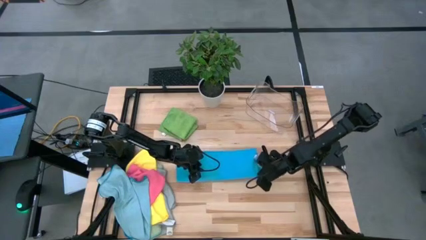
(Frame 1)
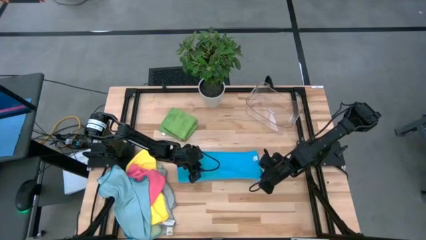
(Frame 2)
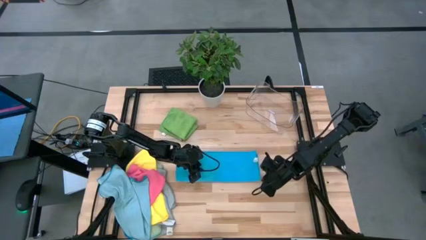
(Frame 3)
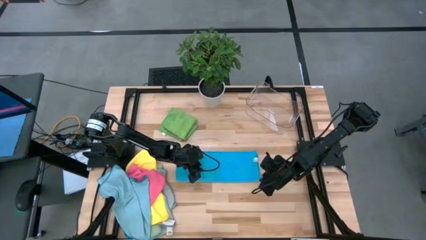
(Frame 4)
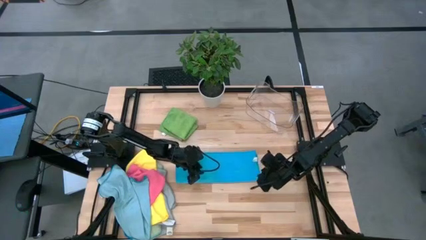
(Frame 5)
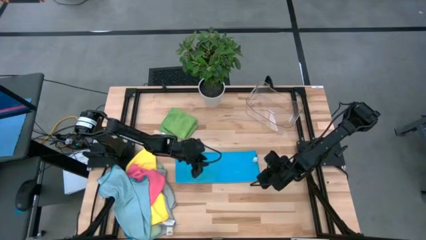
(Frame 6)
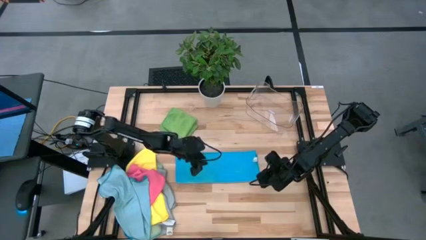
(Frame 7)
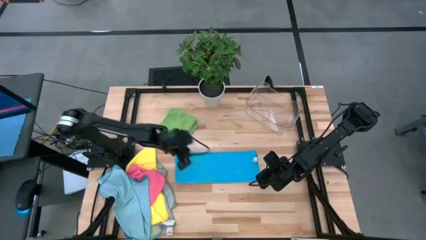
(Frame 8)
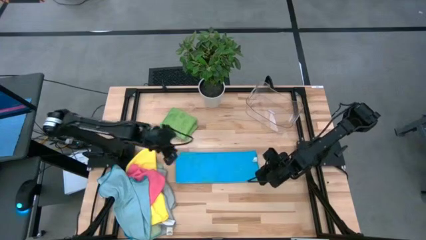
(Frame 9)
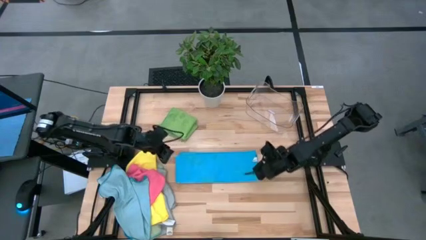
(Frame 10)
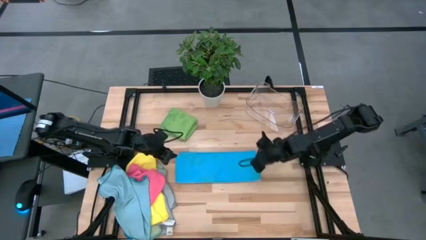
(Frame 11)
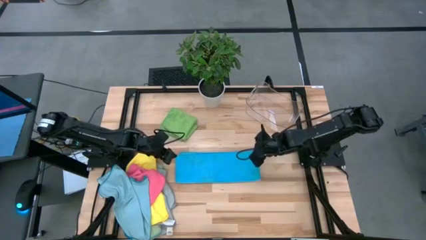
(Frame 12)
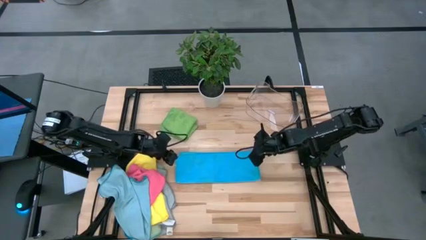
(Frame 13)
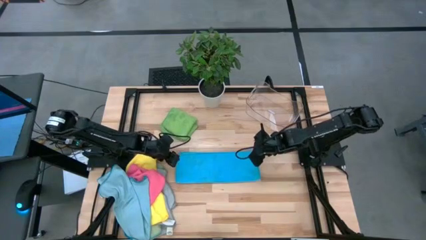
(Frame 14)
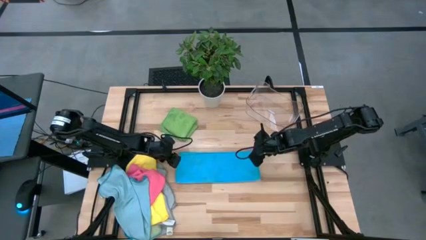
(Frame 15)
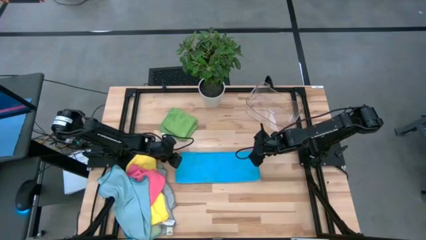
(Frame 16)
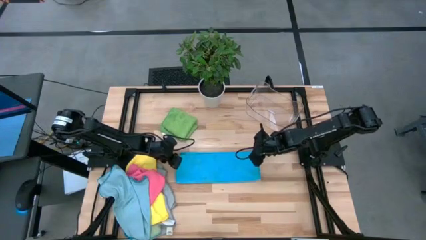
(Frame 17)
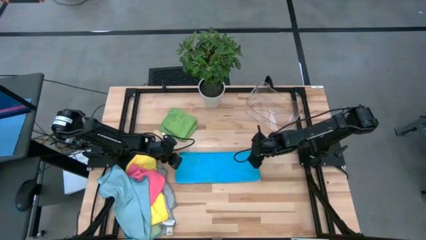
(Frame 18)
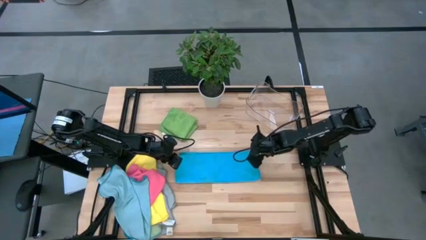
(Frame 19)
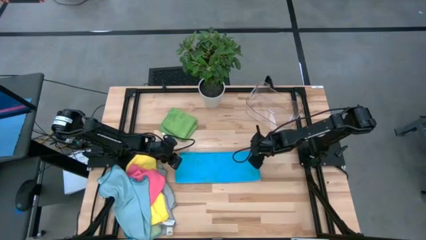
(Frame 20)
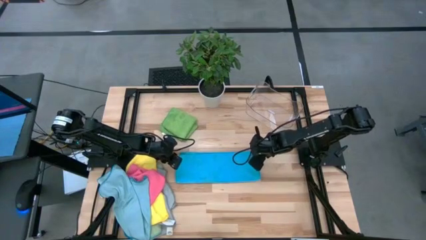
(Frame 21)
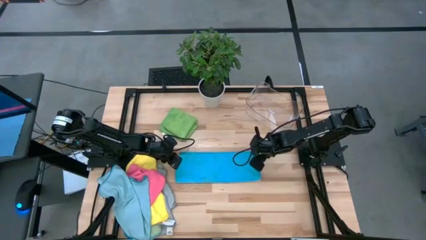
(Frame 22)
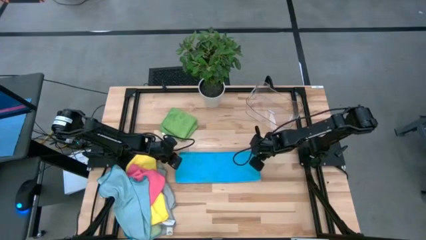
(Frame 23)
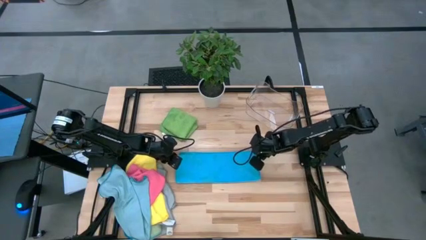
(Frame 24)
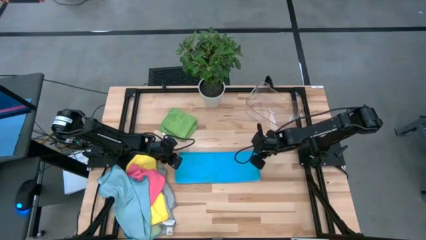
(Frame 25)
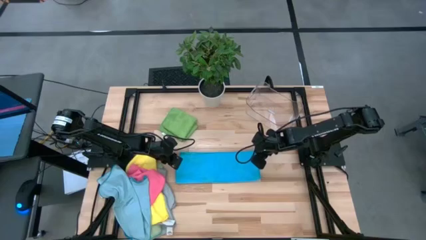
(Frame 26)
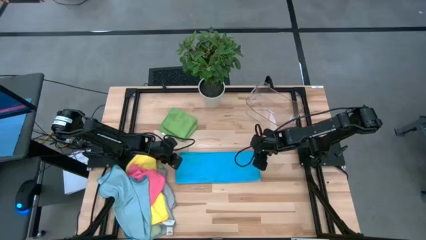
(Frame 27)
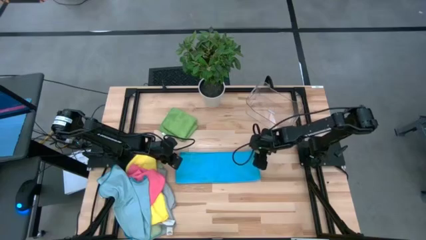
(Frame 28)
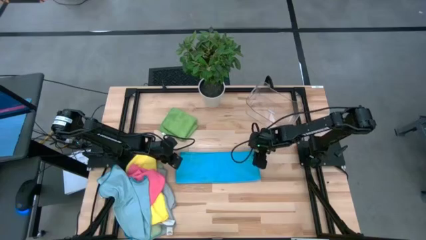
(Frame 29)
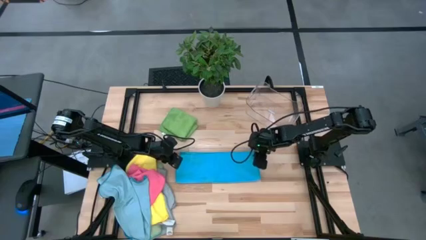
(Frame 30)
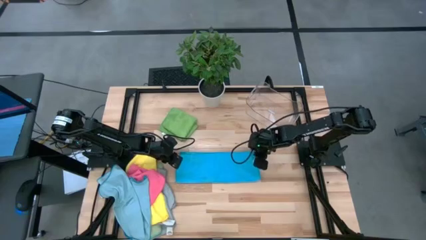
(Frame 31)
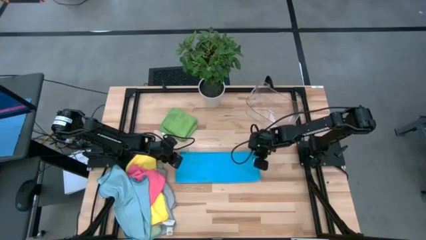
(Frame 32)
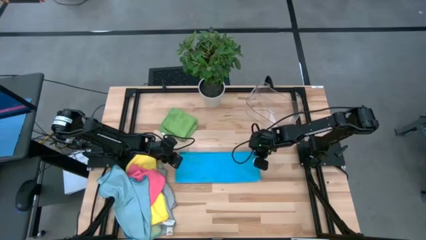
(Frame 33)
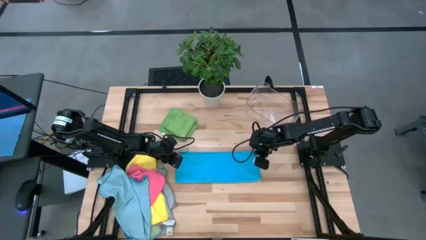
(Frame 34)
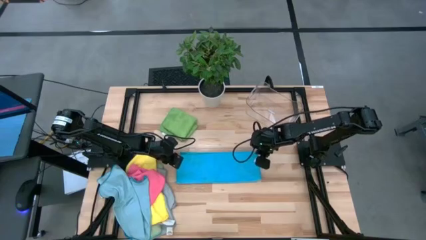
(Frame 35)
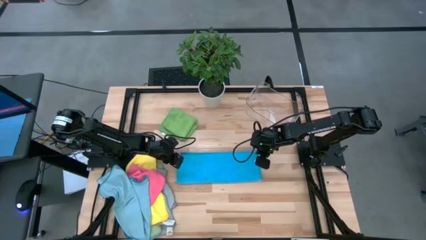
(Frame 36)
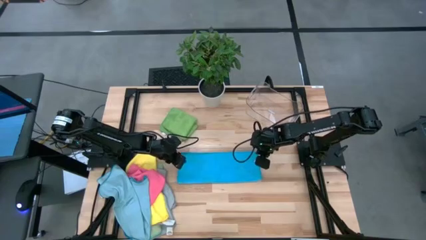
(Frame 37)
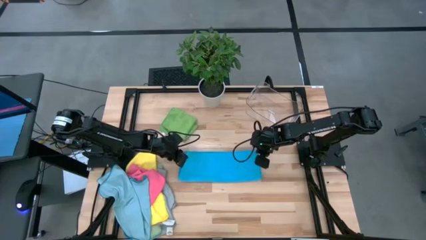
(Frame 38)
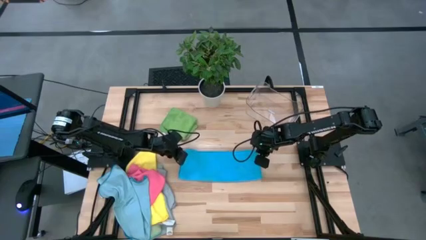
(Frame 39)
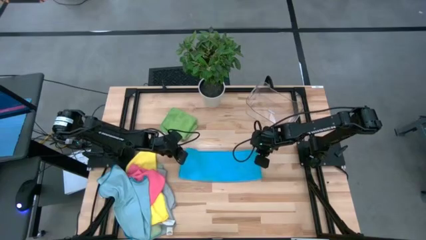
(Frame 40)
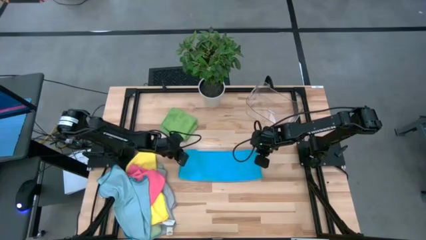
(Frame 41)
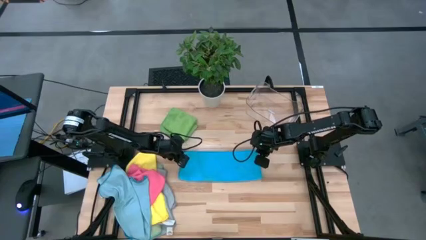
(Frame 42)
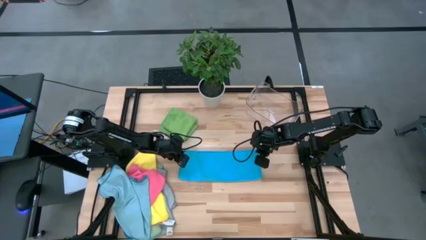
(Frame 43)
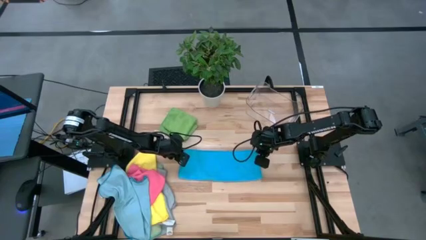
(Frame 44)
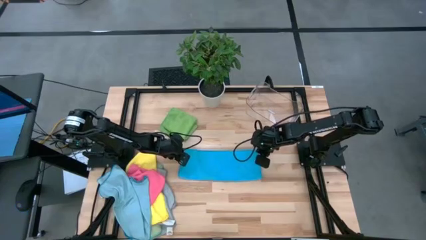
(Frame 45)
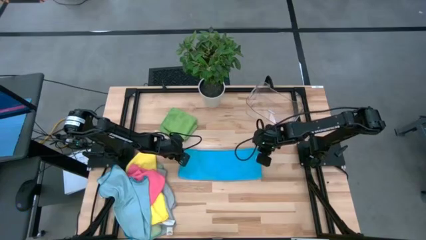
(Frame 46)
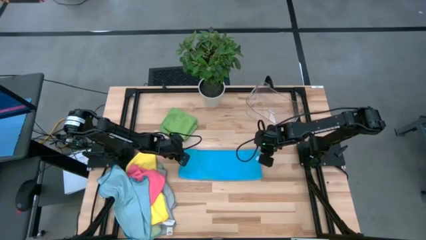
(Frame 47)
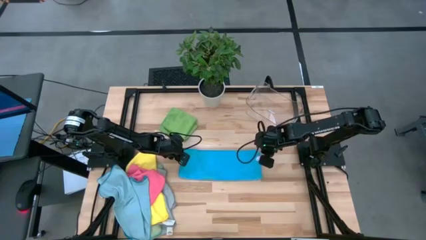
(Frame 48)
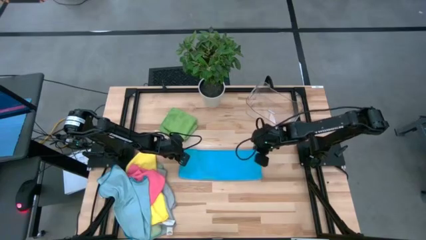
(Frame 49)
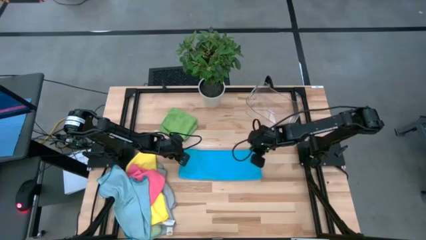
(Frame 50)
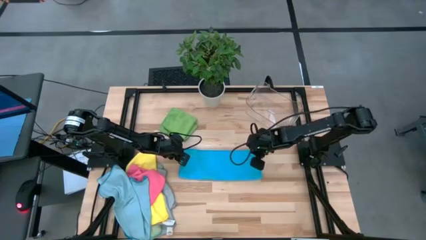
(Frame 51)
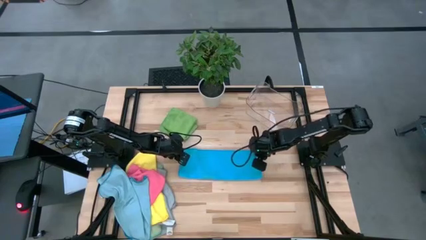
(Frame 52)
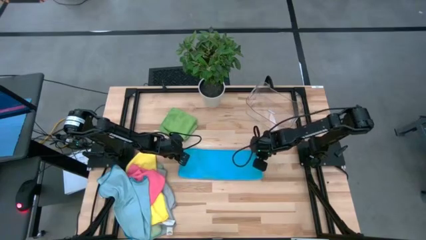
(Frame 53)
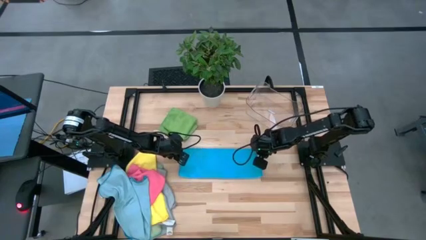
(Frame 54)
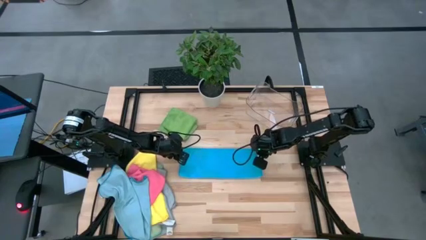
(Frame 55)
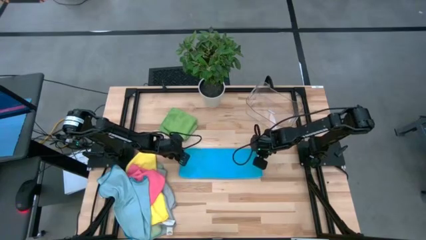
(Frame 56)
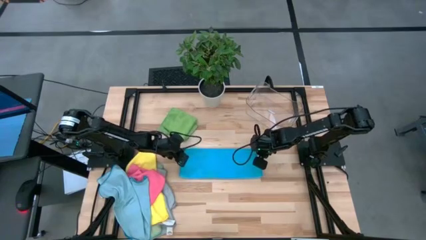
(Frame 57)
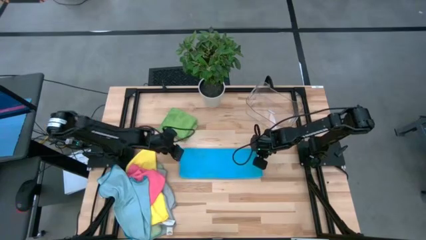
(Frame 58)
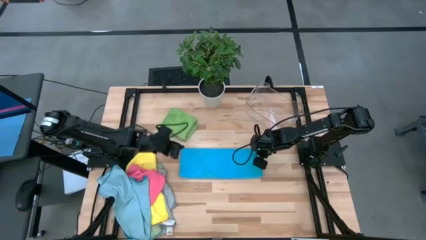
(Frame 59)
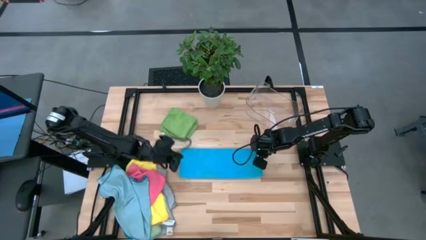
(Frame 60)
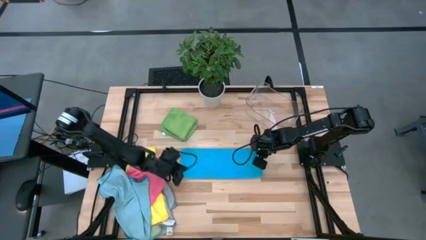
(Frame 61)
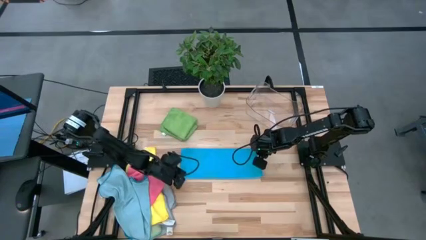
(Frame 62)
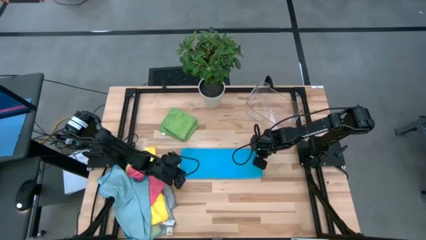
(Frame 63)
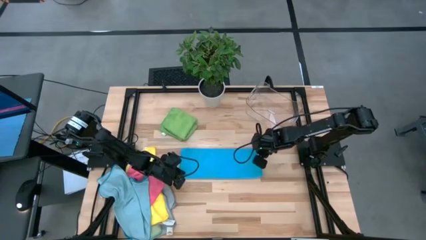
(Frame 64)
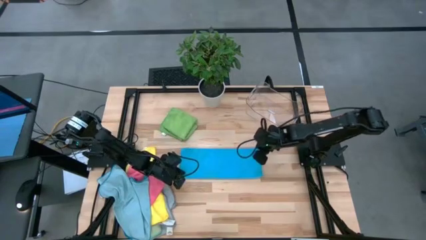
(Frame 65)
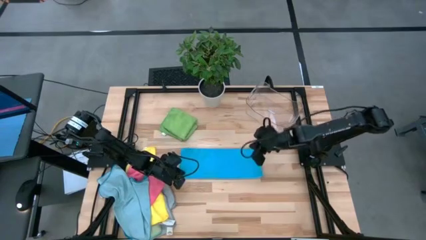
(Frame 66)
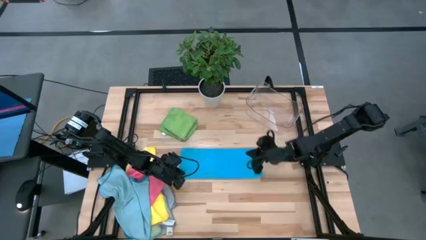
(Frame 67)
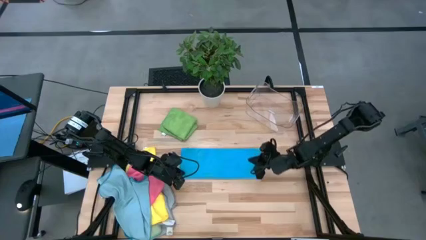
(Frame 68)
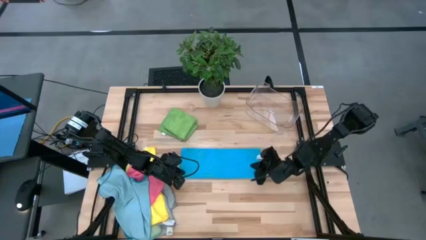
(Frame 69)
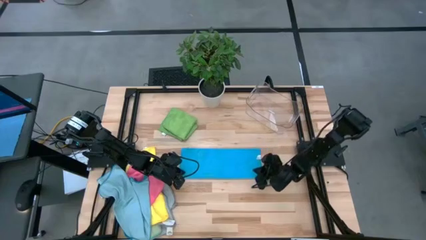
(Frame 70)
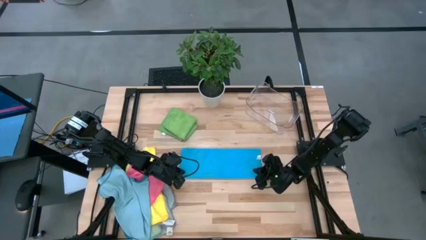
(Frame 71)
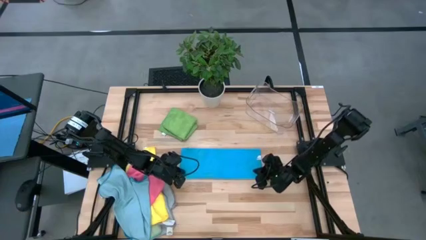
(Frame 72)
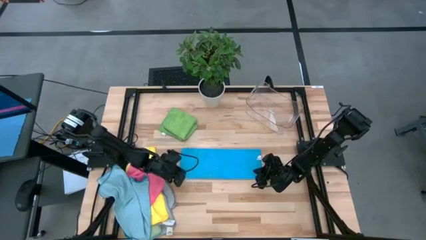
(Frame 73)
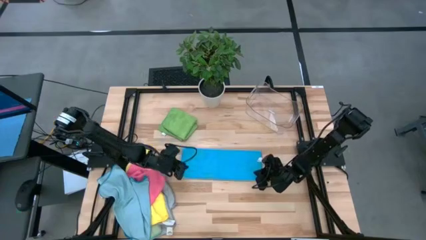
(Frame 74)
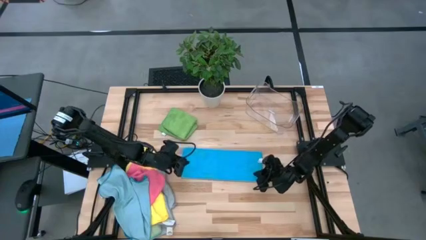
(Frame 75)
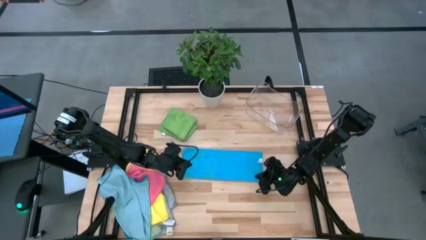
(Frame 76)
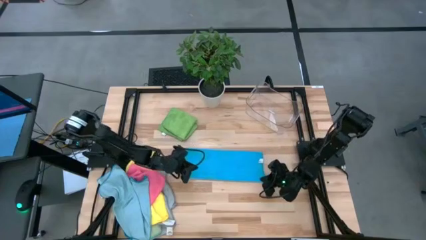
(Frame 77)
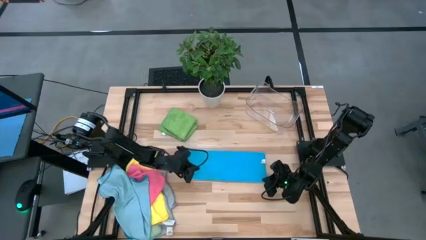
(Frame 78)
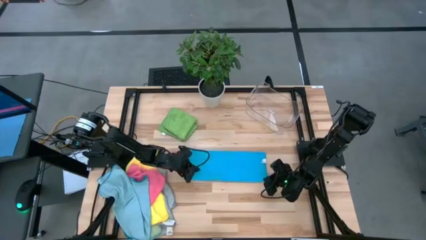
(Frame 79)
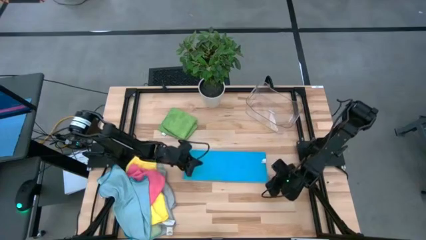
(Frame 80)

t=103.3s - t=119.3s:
Task: Fold microfiber towels
Fold the blue microfiber towel

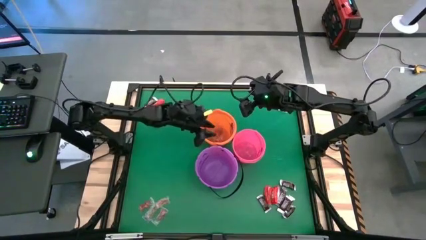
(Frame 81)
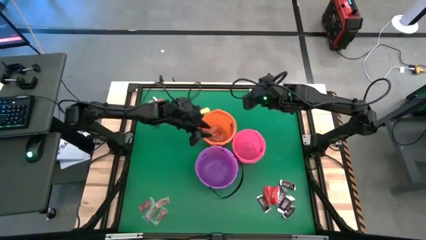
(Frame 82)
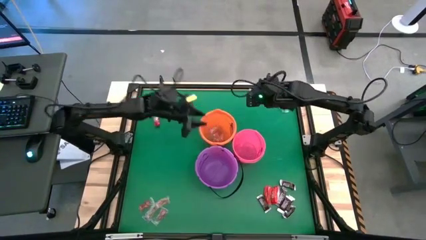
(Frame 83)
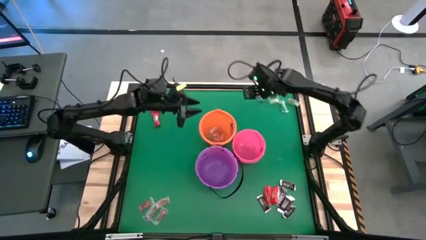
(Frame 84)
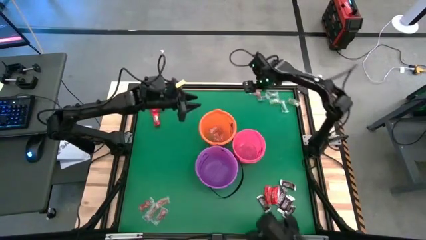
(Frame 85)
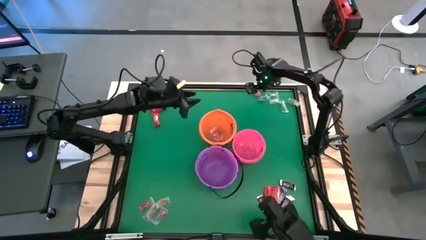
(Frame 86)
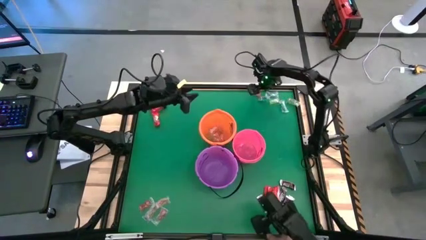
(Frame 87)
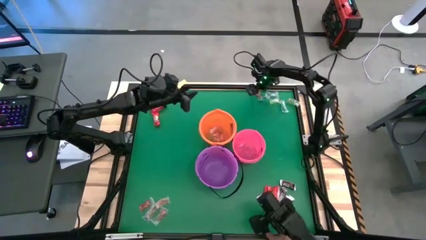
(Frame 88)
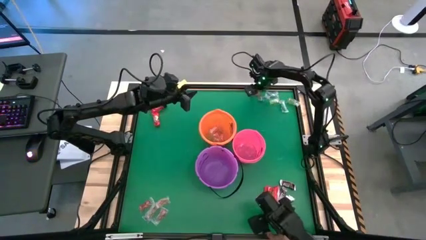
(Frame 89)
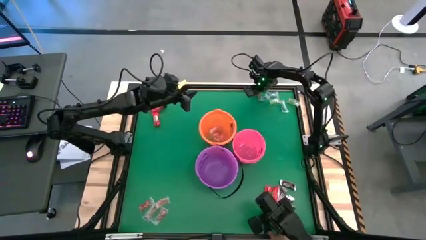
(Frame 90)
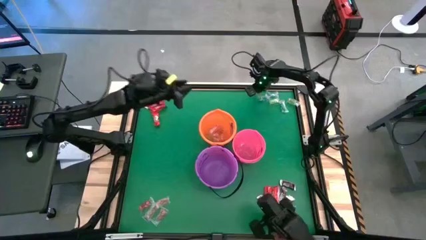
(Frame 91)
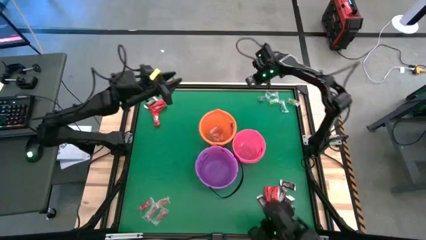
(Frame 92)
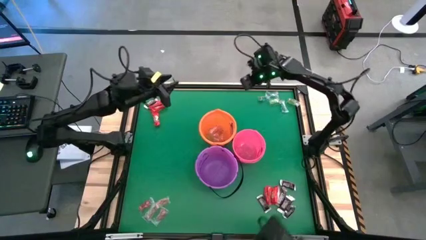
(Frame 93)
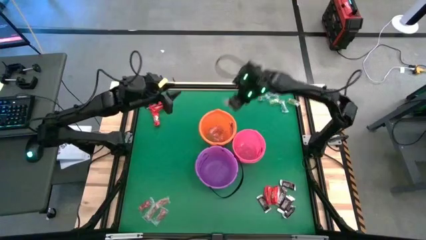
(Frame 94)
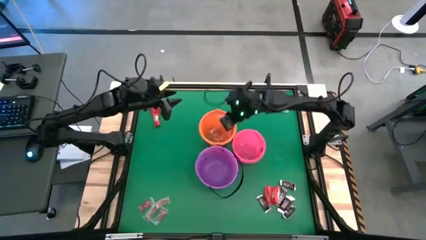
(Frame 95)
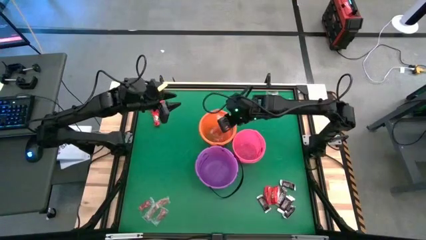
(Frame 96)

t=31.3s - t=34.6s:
Task: Sort candy by brand, put in halloween buckets
Put the orange gummy into the orange bucket
